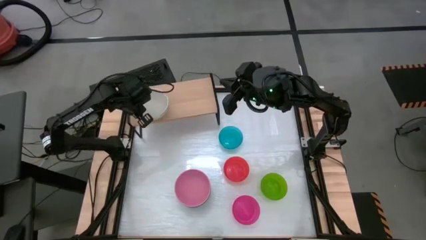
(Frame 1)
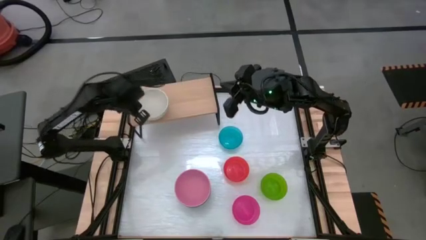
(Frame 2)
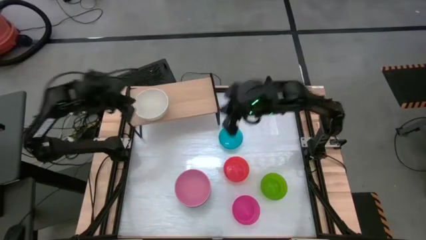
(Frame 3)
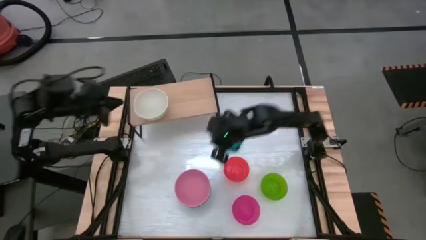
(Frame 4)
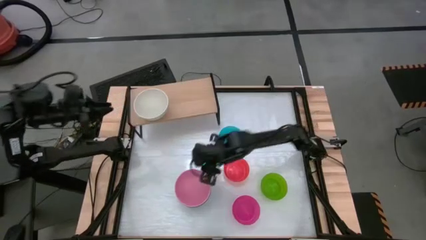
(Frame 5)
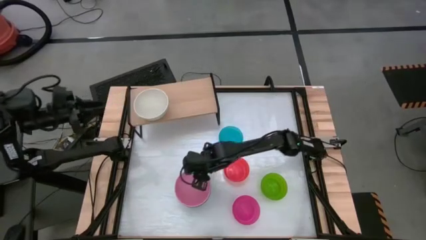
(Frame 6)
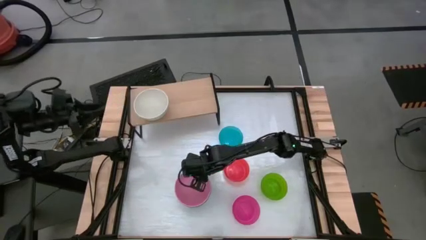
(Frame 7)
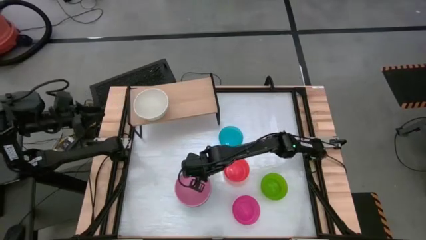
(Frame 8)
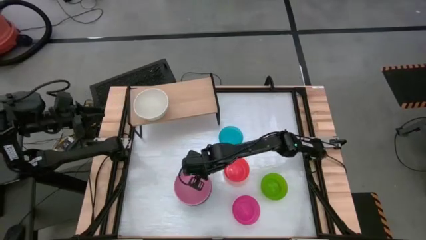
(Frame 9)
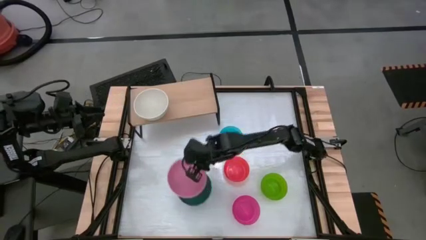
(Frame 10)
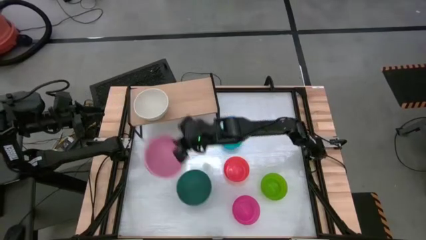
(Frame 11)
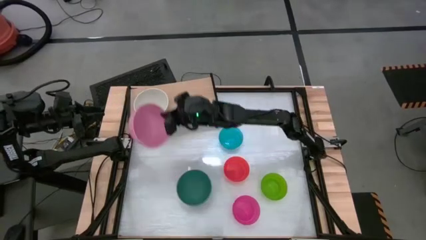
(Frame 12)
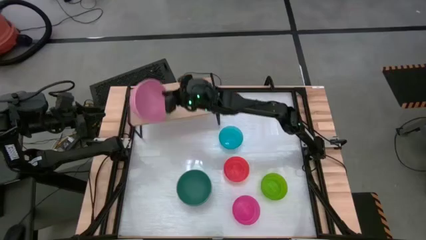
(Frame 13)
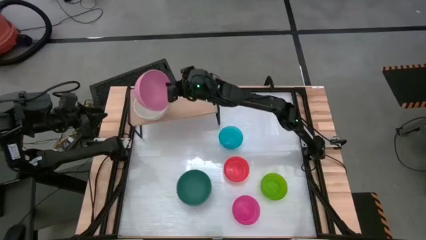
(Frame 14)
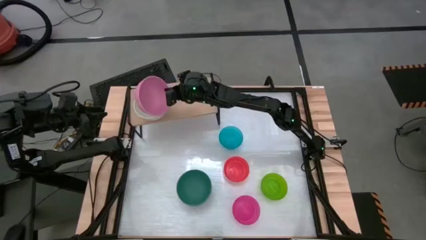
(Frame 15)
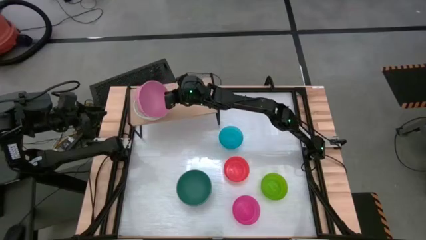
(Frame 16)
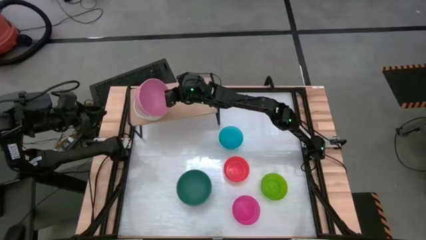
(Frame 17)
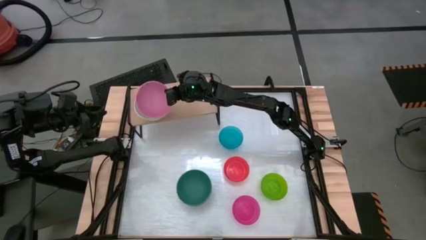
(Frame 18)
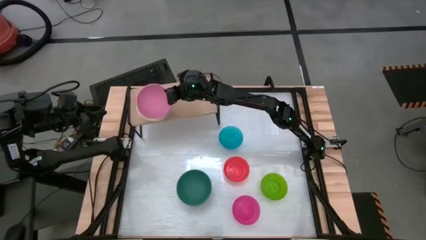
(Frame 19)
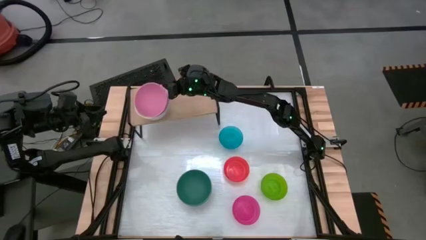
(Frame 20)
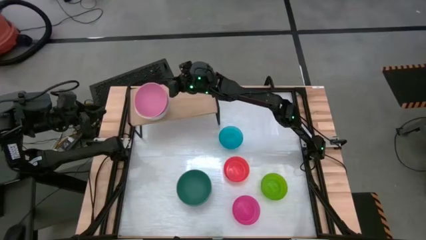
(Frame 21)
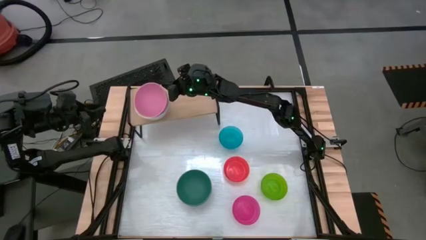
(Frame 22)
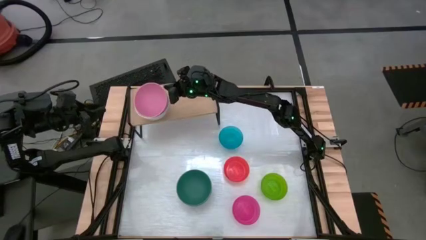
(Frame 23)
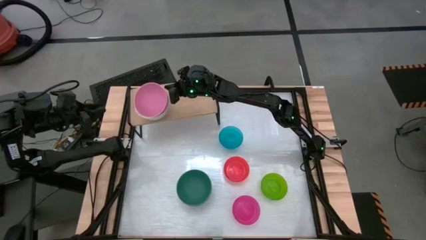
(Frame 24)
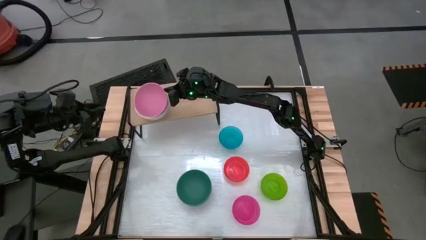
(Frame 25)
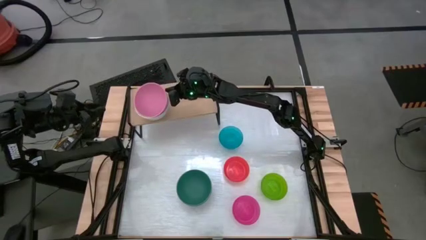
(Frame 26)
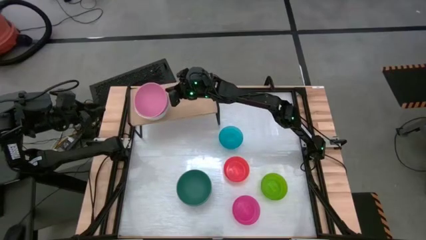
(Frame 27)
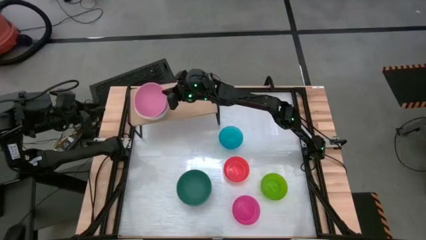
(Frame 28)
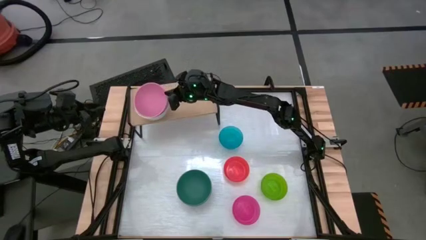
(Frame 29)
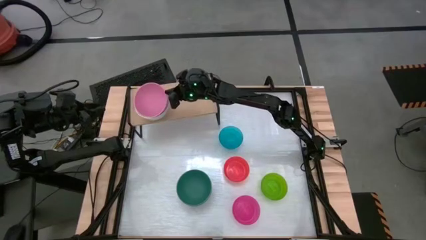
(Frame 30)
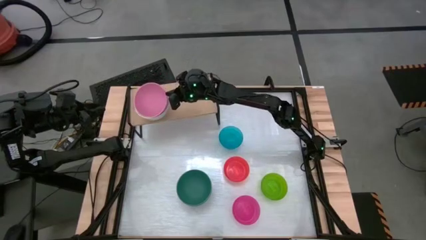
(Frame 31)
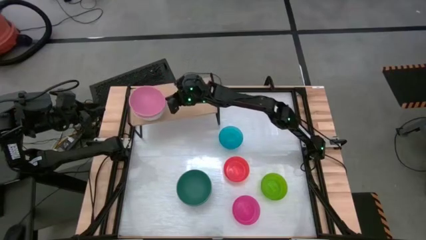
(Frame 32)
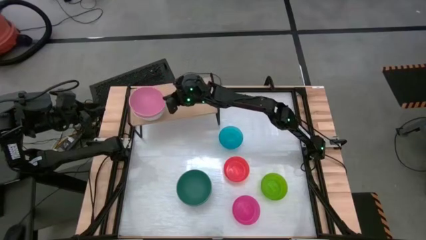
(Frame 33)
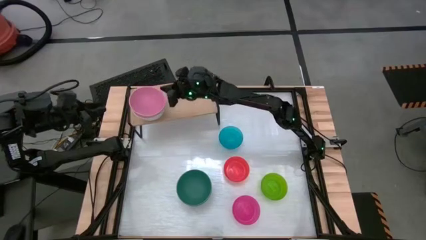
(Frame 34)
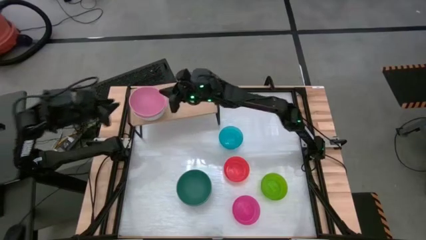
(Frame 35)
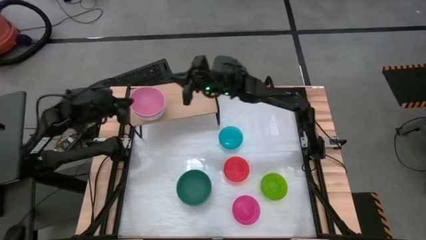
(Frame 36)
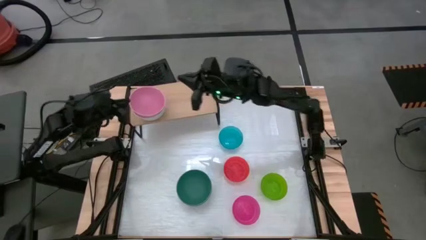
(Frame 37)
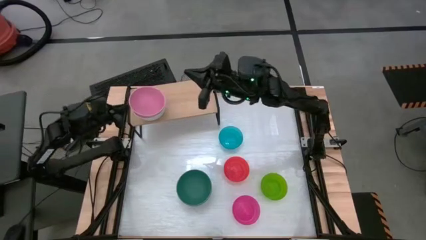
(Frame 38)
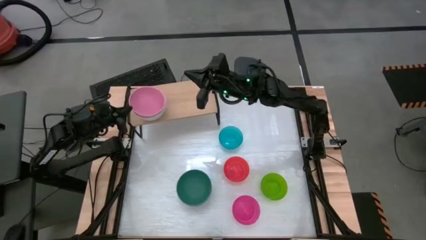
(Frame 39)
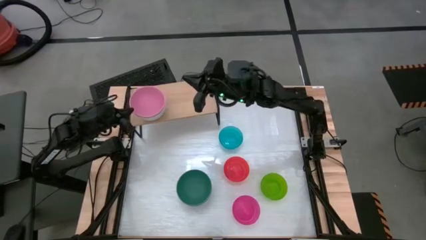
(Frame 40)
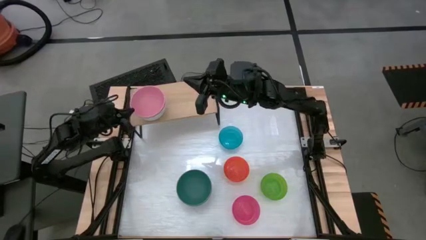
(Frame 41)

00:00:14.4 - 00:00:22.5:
Task: Place and stack bowls onto a shelf
Stack the big pink bowl on top of the big white bowl on the shelf

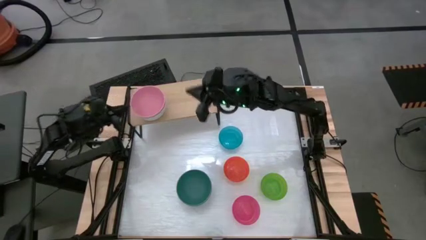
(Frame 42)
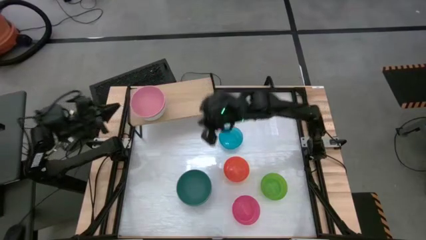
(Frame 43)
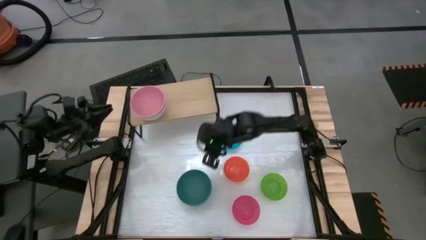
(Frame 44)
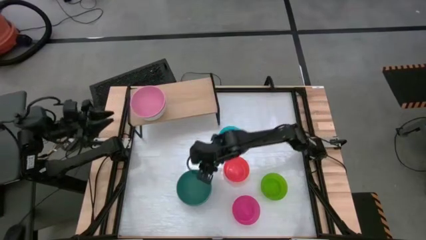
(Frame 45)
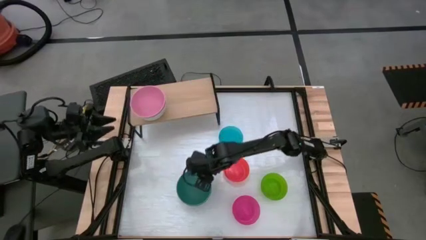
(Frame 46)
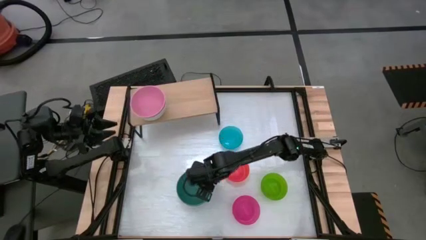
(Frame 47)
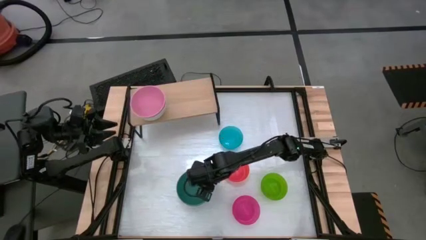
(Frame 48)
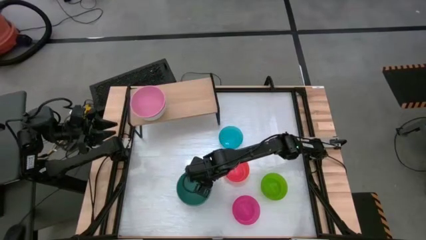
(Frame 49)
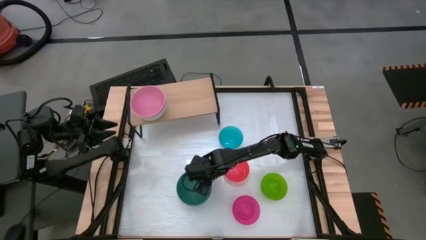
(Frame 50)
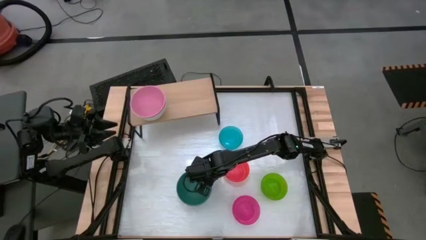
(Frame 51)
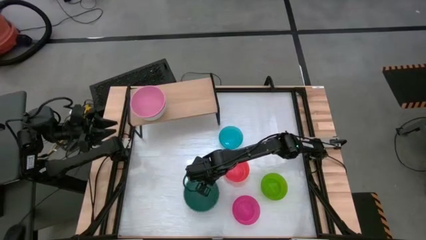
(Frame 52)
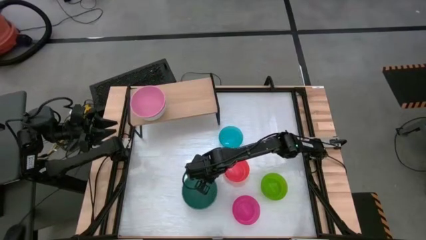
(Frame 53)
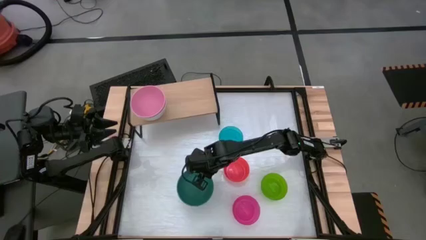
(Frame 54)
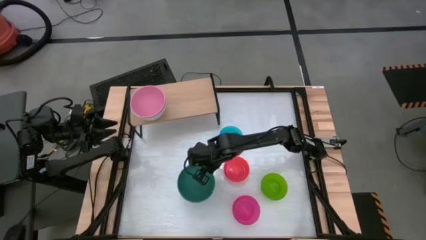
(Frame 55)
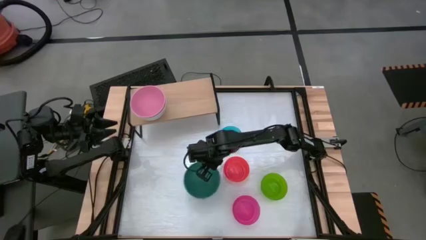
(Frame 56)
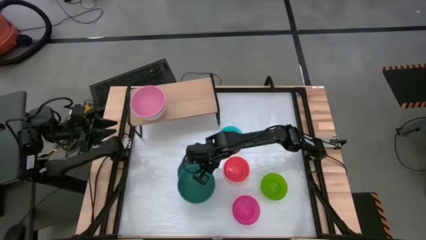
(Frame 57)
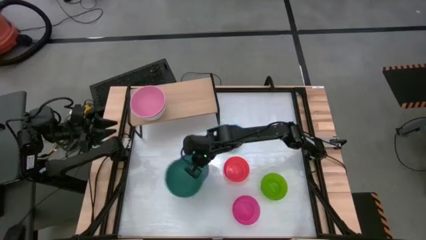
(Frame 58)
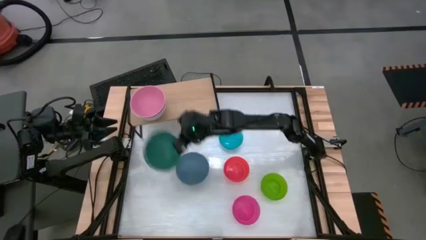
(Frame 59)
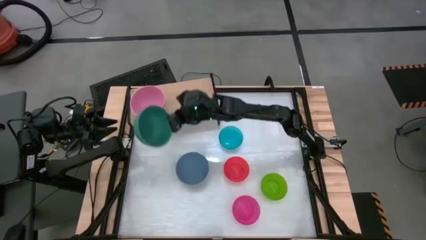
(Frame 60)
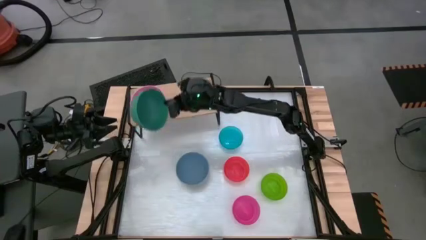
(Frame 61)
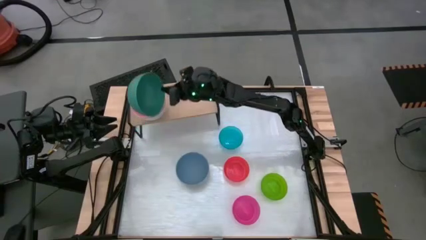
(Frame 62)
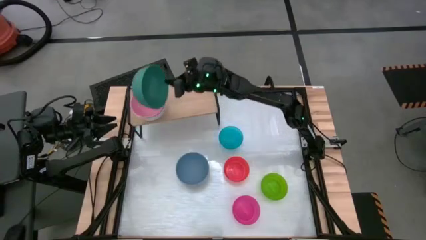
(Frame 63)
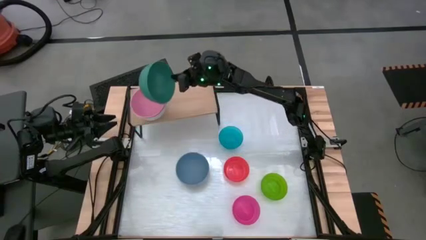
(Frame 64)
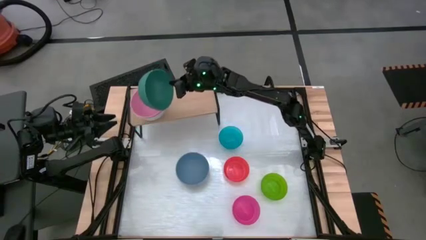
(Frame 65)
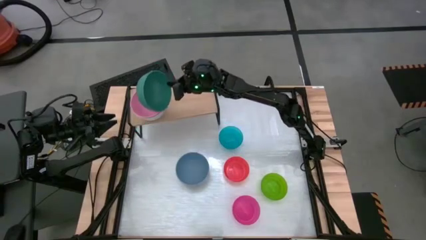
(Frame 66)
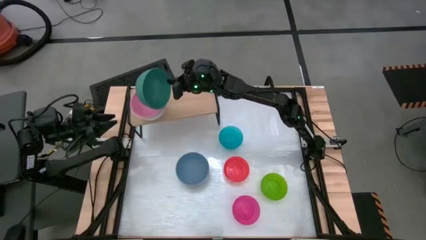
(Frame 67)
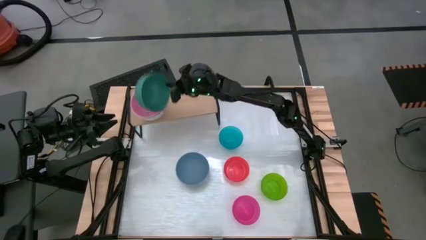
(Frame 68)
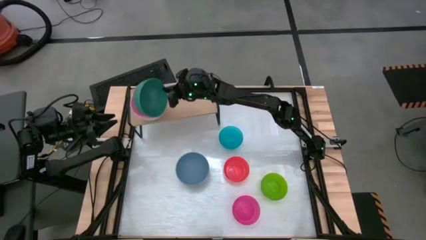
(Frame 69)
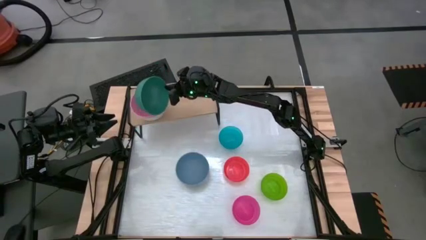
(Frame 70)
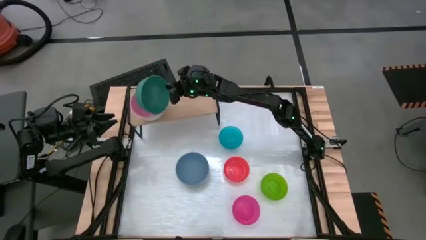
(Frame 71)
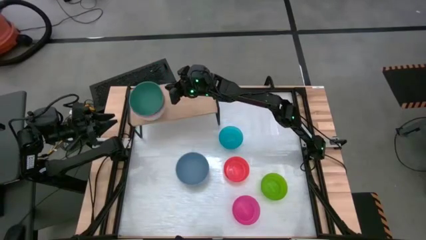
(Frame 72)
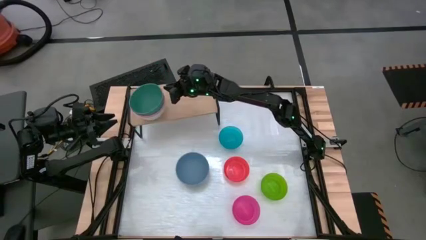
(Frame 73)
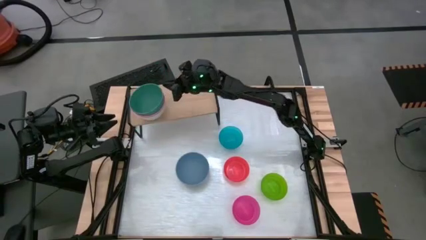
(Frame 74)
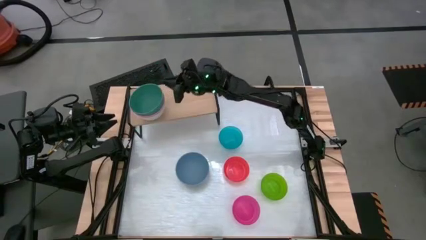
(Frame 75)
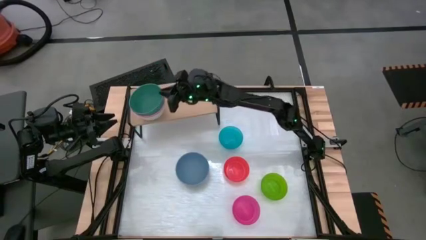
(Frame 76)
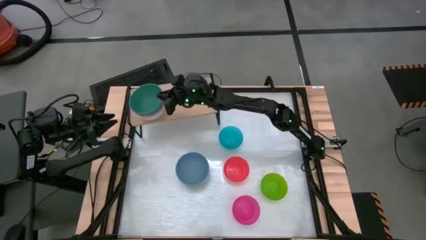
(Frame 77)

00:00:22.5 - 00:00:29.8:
Stack the big dark green bowl on top of the big pink bowl on the shelf
